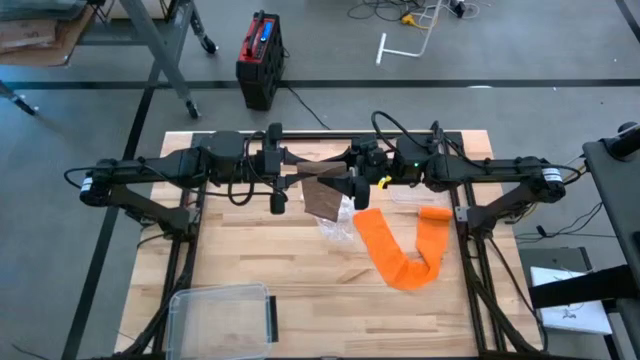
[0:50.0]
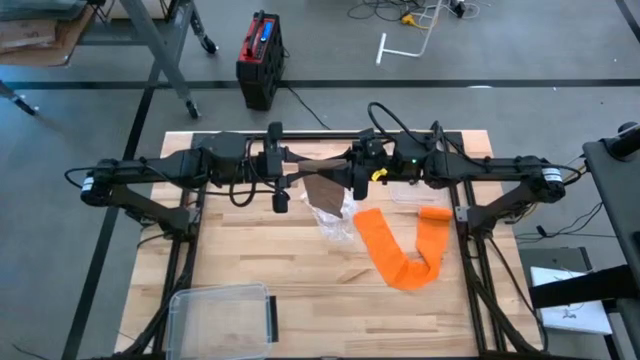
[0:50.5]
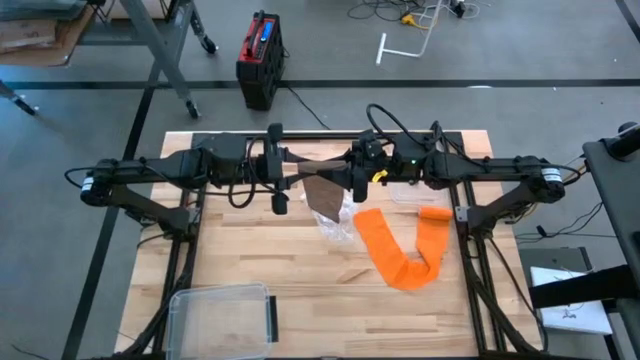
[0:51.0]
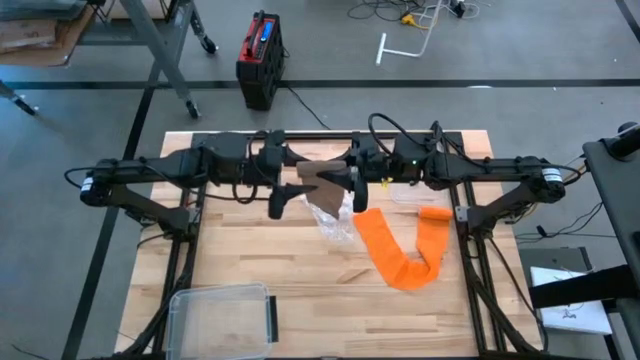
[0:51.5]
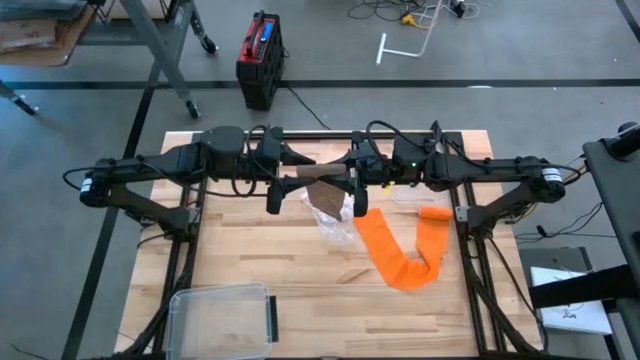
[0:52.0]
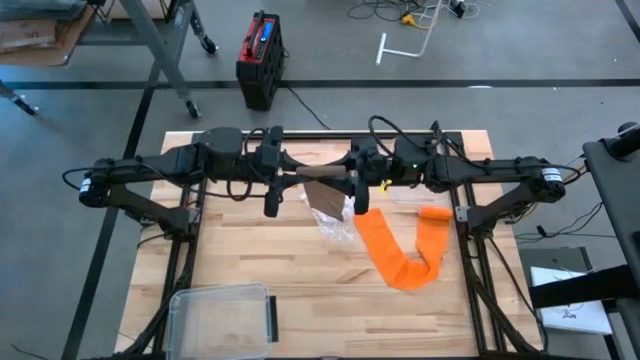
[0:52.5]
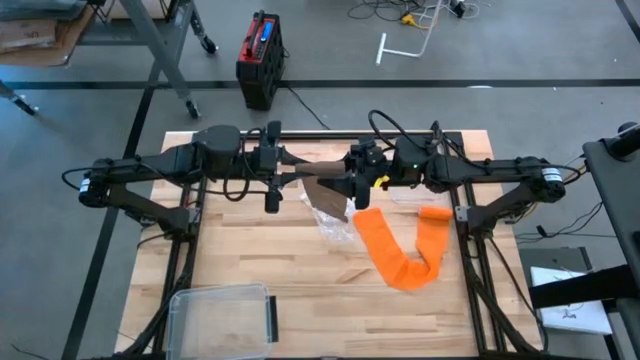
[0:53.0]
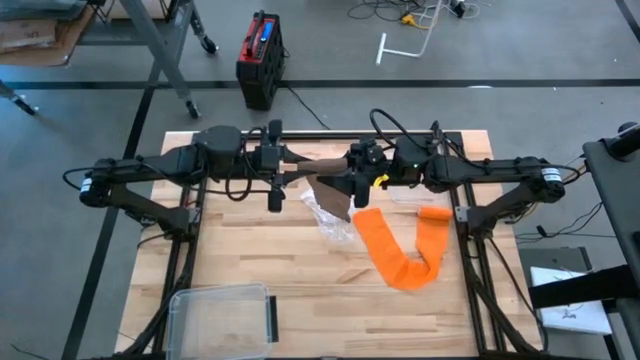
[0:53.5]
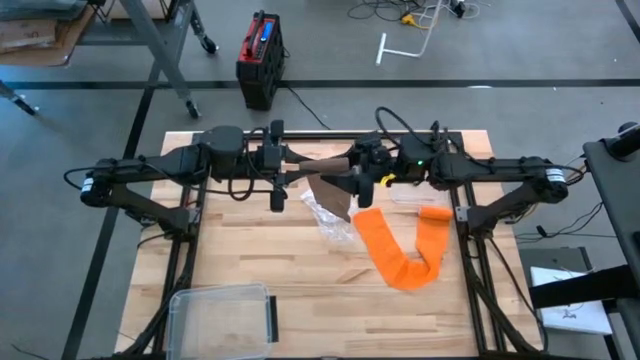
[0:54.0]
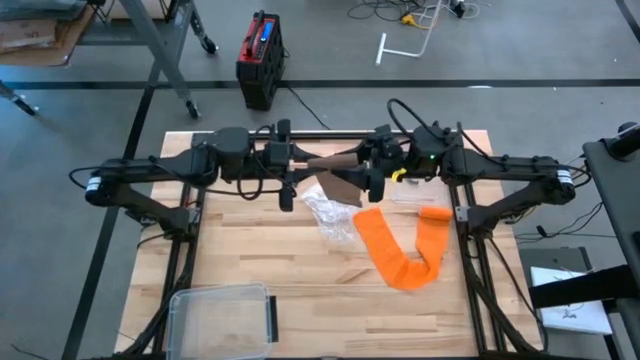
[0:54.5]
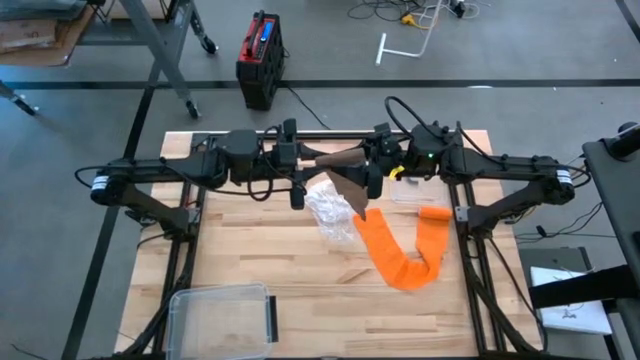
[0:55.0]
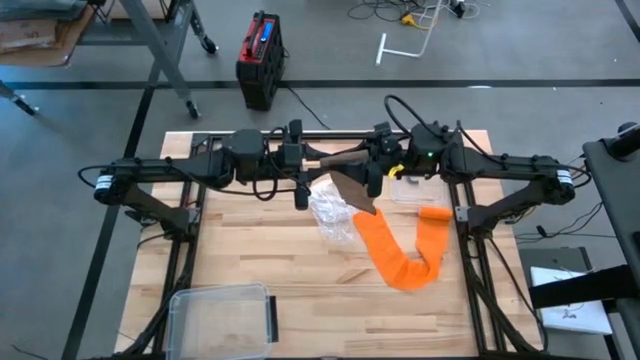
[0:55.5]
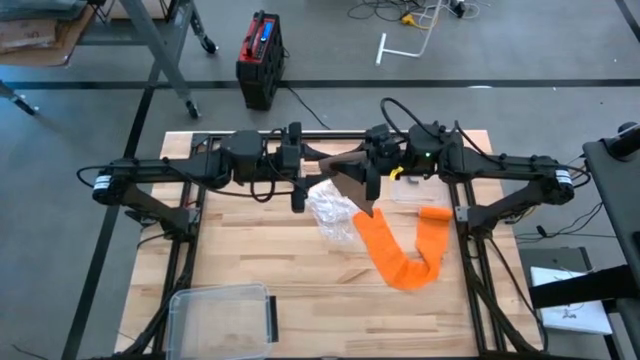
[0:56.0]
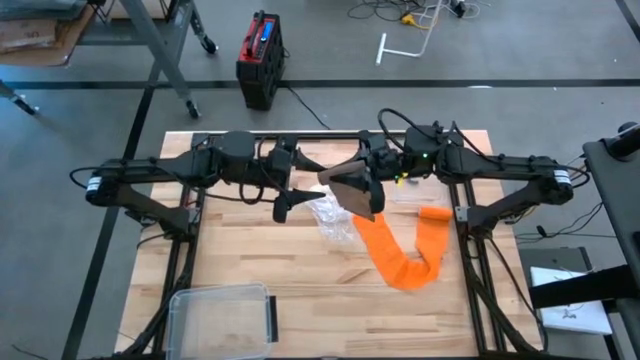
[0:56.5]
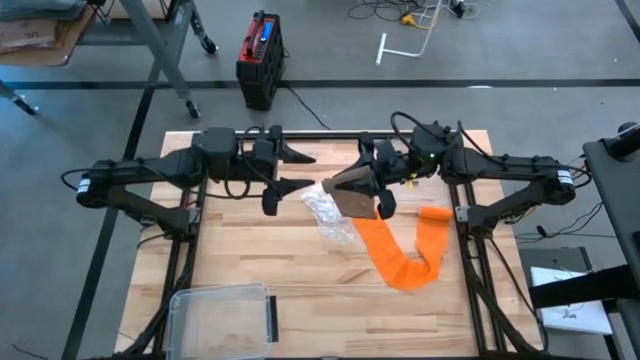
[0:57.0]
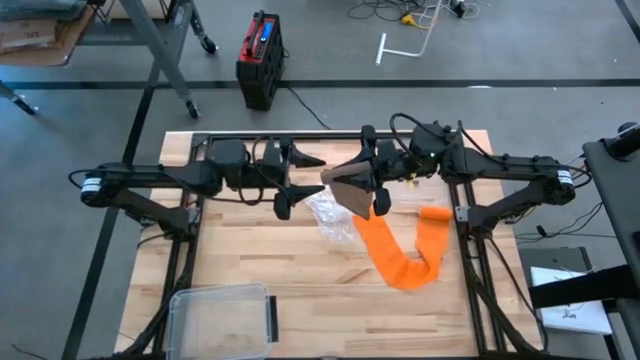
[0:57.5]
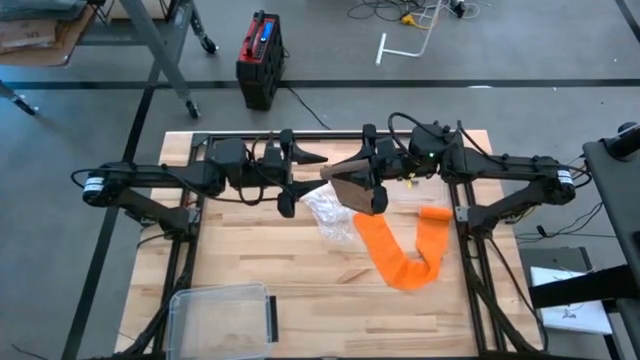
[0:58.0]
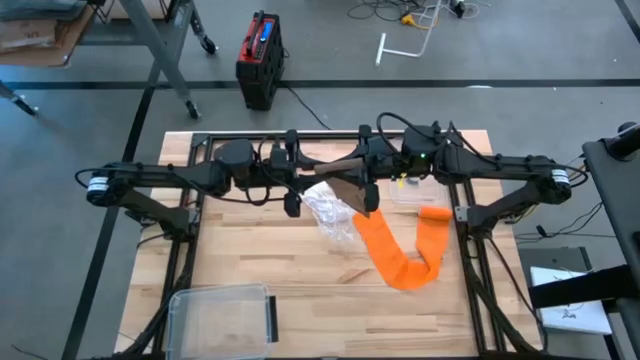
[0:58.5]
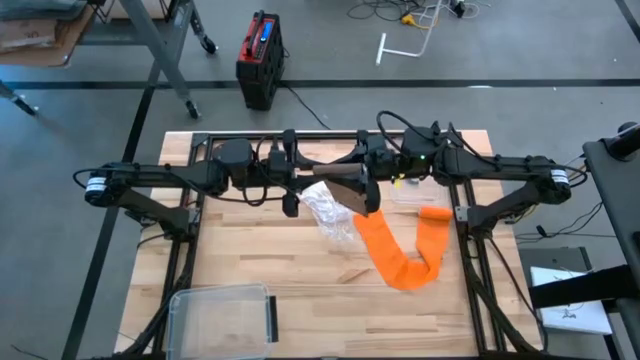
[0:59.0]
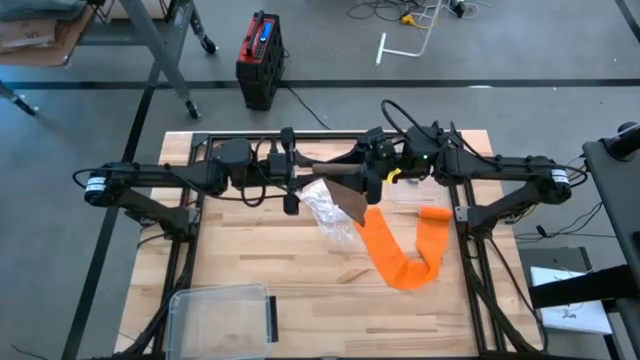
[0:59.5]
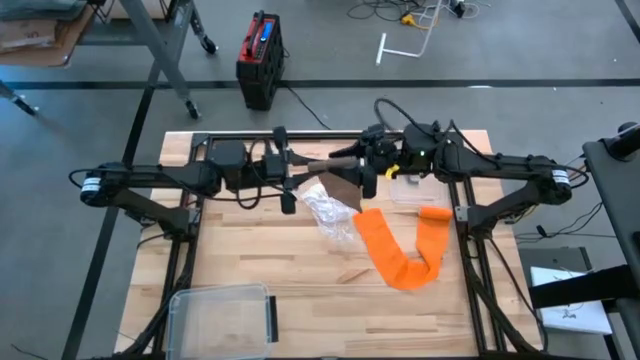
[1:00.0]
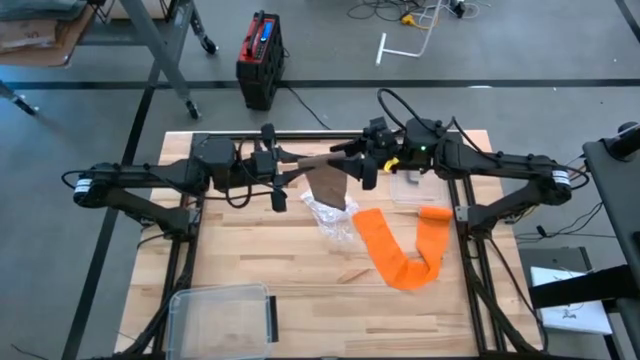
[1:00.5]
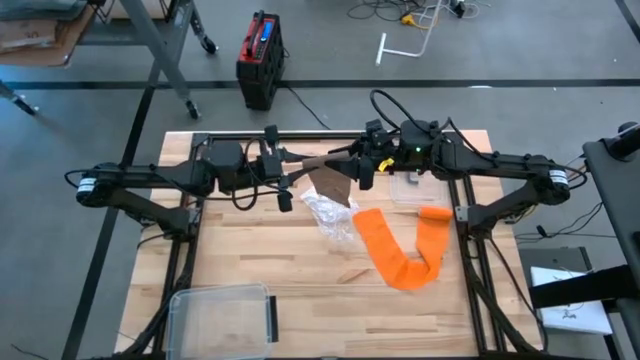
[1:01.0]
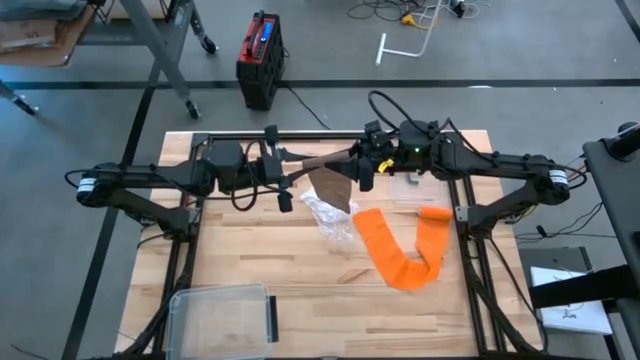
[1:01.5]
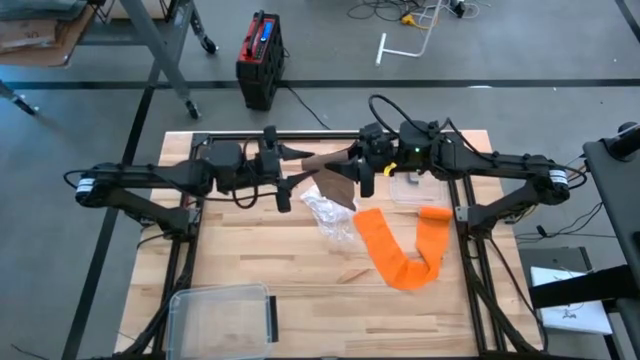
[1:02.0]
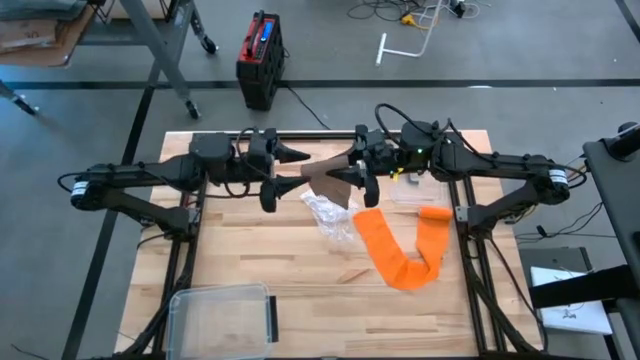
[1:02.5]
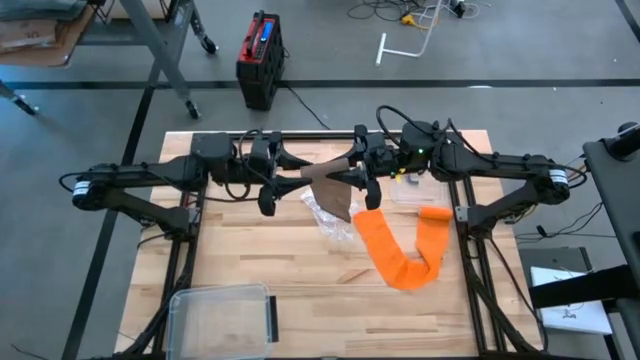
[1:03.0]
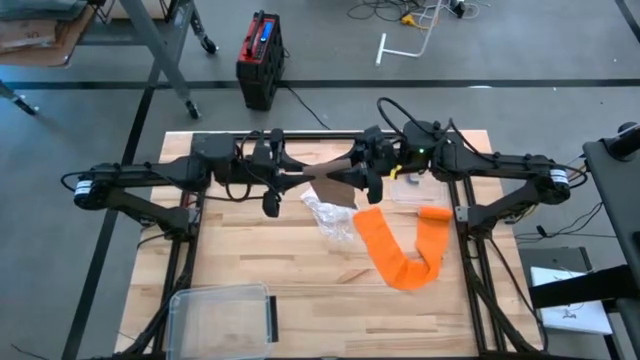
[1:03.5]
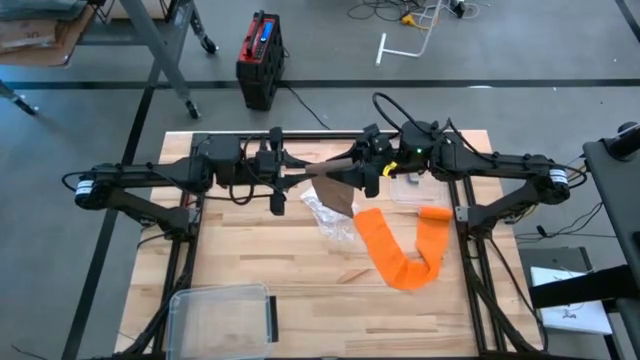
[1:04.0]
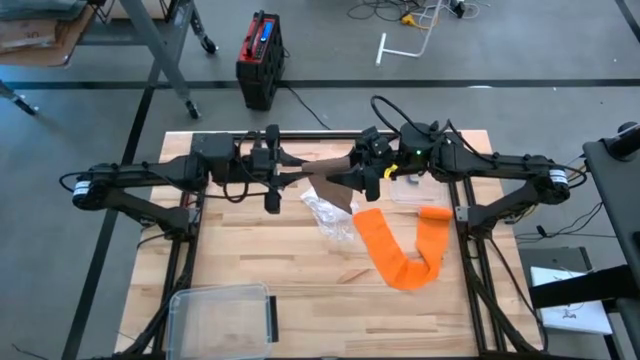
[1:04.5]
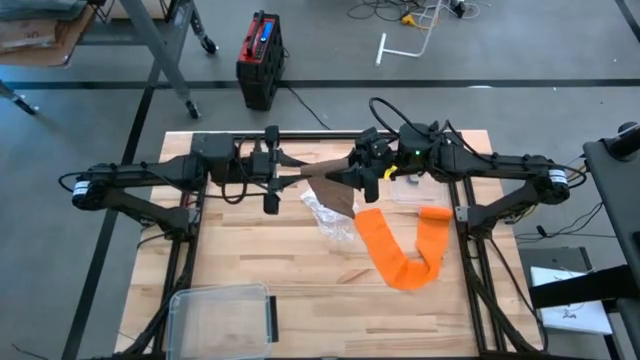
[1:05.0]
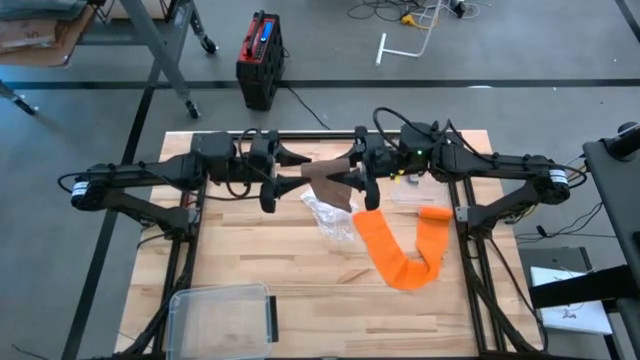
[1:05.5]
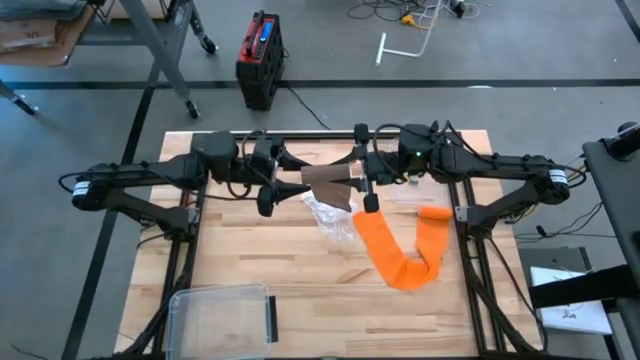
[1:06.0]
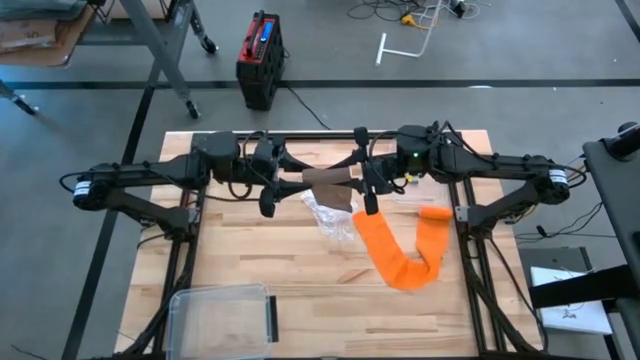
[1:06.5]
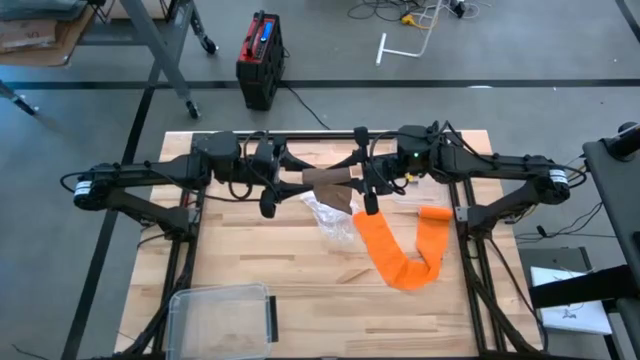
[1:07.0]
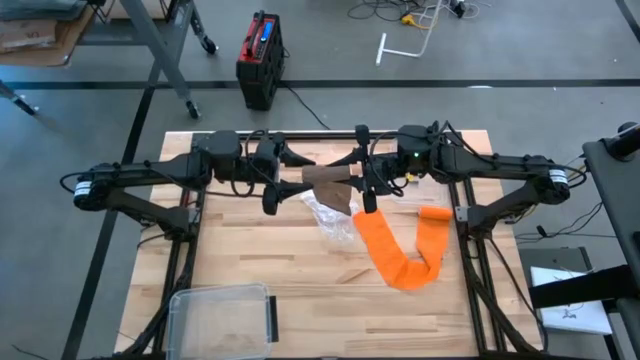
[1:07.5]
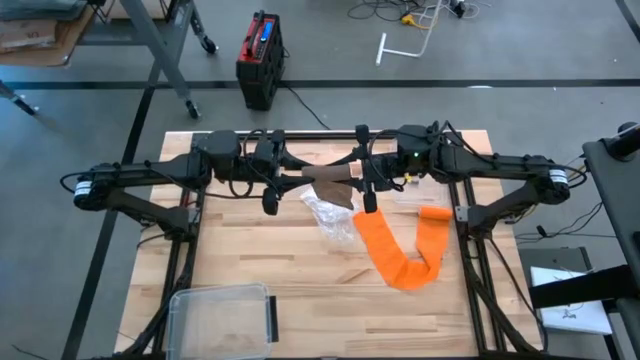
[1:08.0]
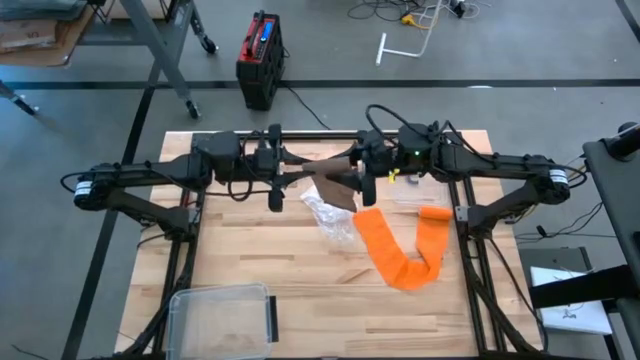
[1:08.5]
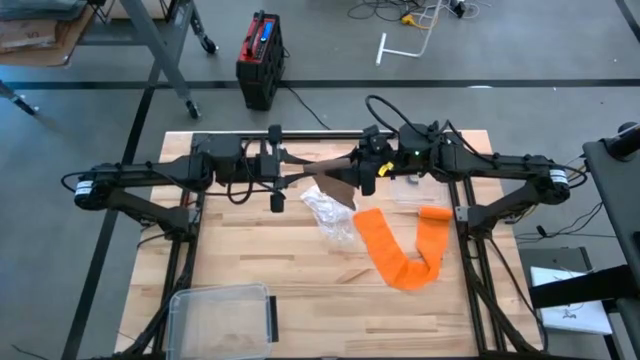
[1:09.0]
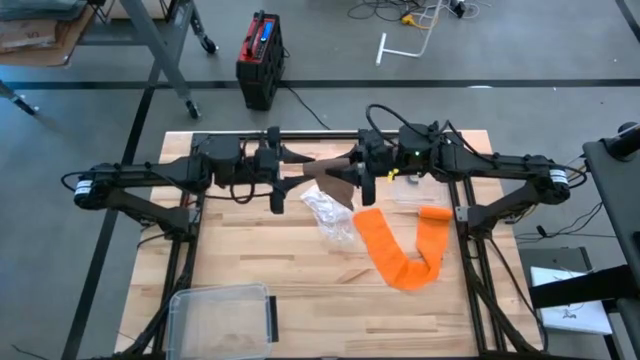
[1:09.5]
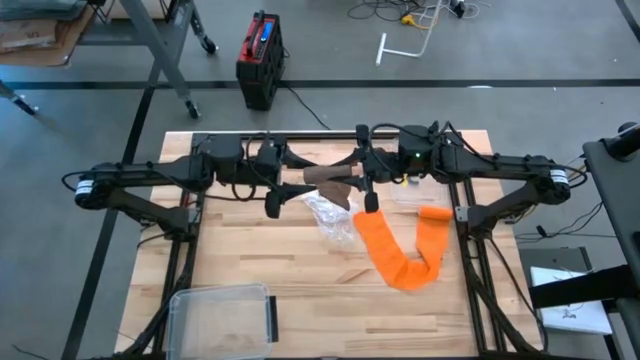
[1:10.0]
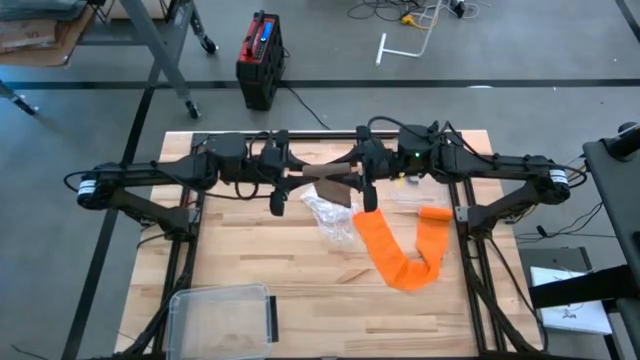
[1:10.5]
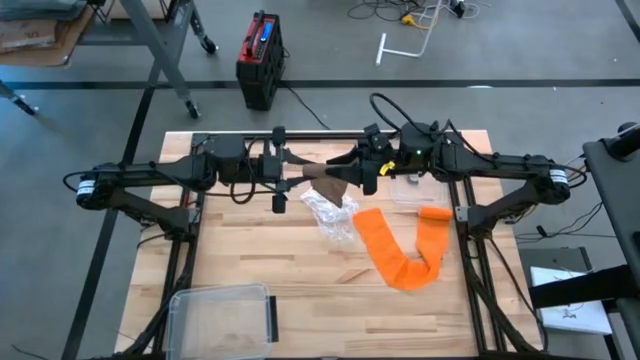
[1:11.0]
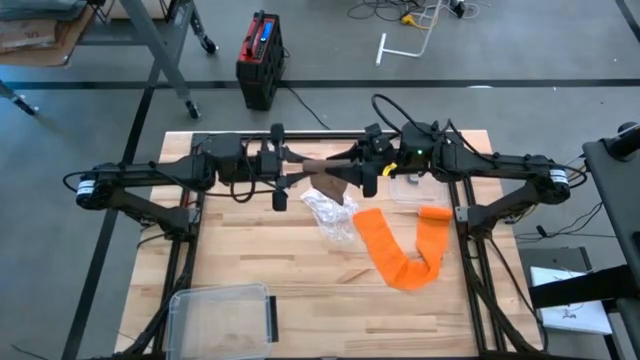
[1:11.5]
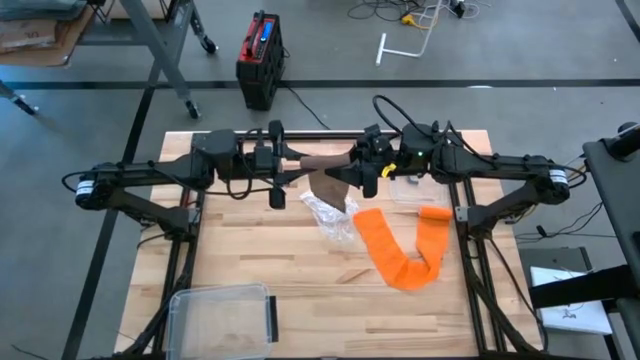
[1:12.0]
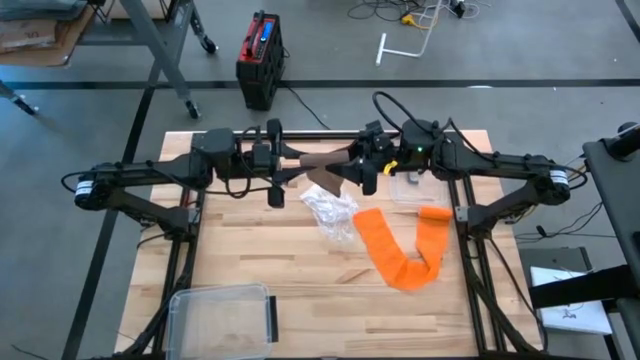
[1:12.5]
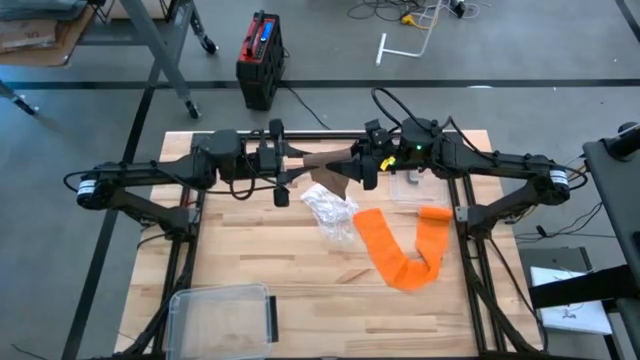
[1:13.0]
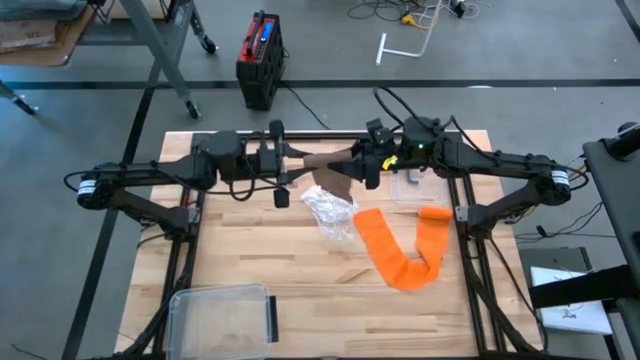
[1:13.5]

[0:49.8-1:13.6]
Task: Roll bandage
Roll the brown bandage
